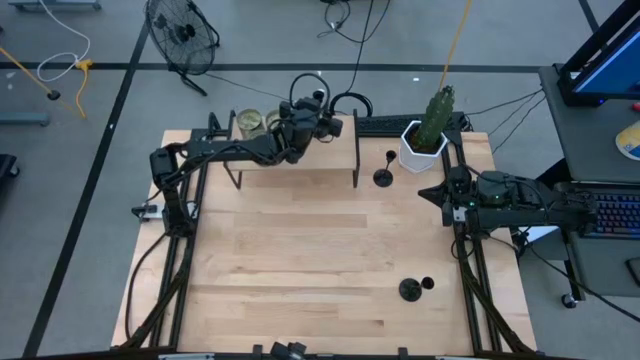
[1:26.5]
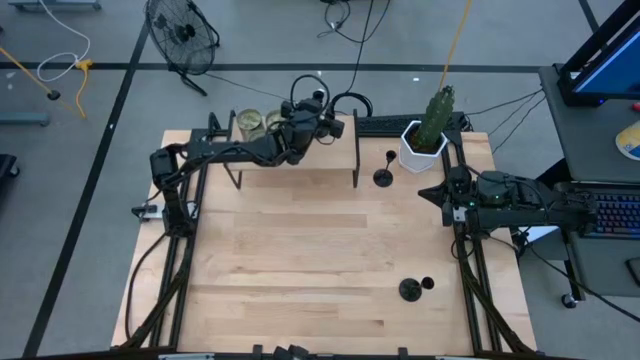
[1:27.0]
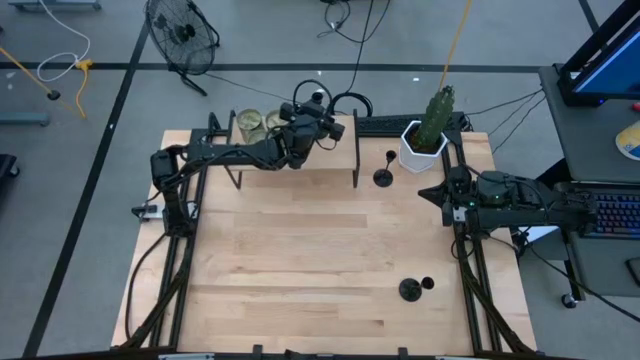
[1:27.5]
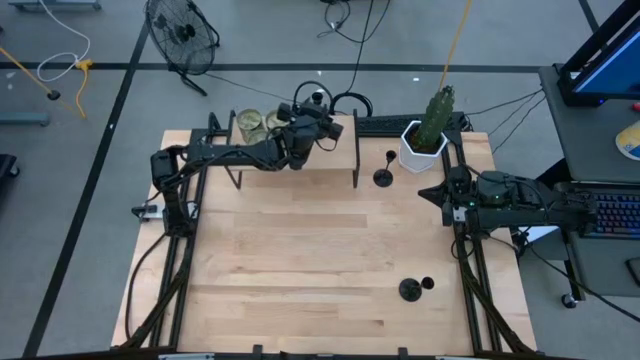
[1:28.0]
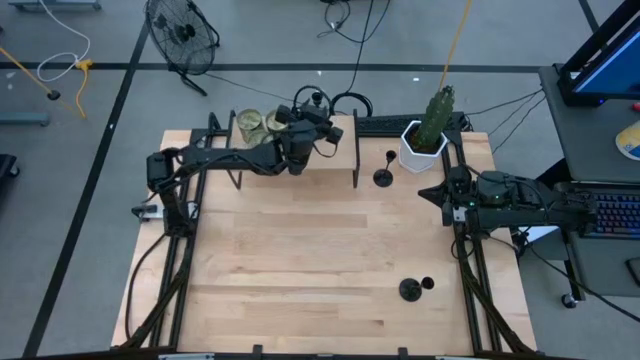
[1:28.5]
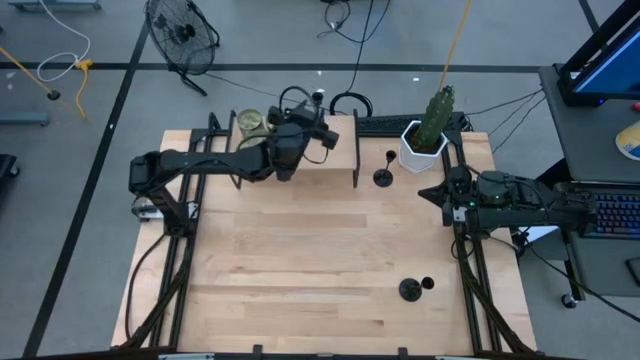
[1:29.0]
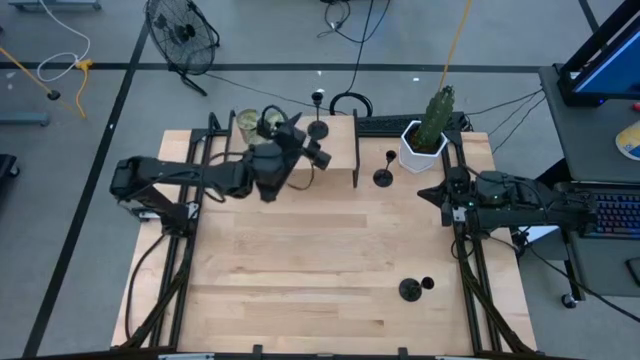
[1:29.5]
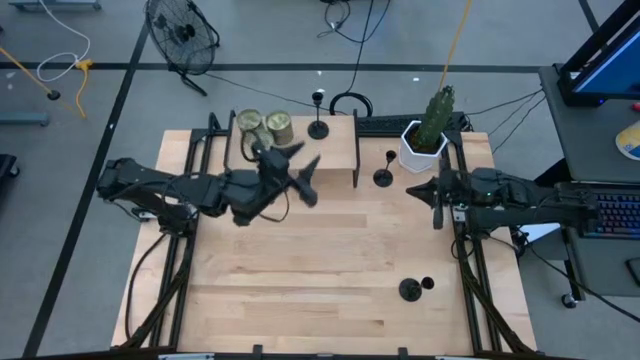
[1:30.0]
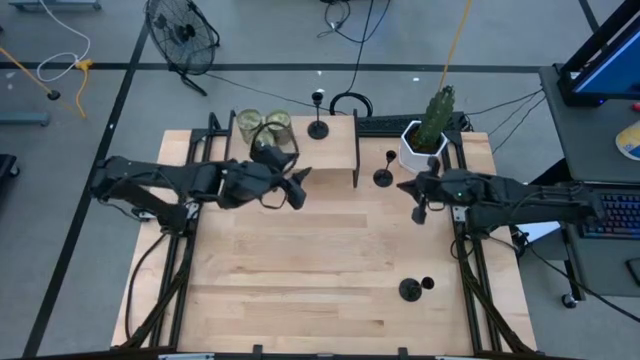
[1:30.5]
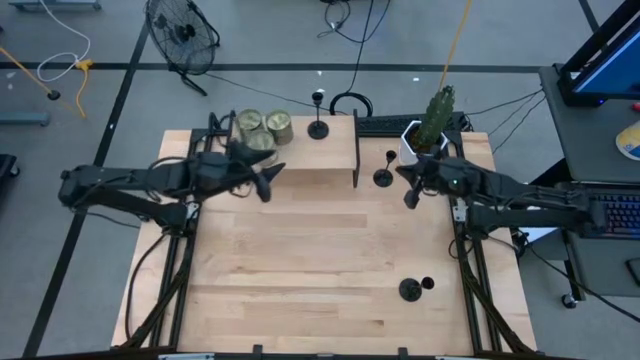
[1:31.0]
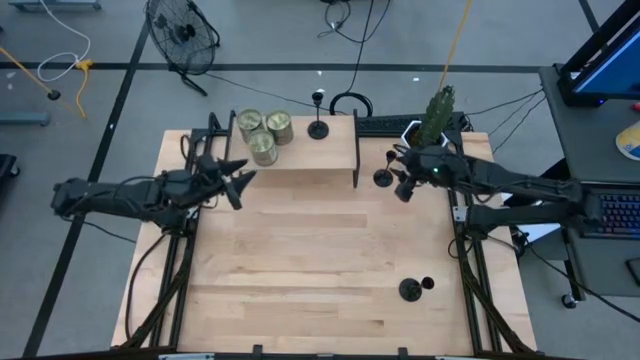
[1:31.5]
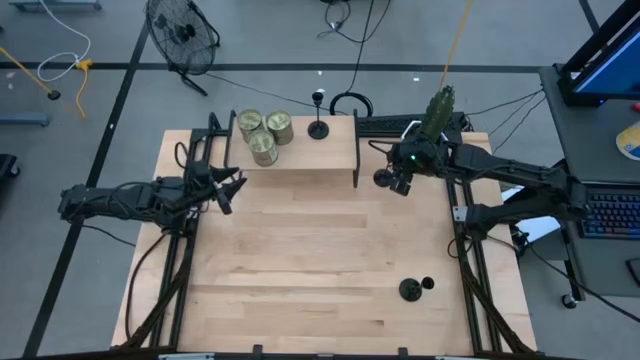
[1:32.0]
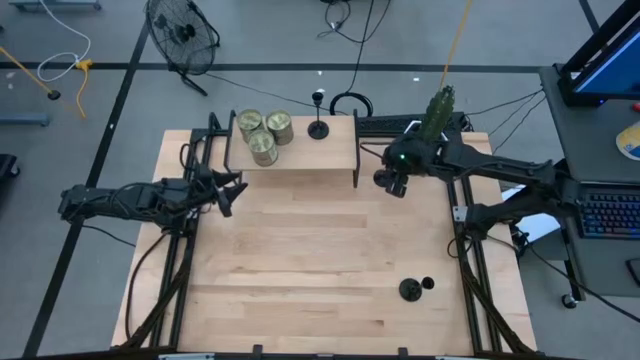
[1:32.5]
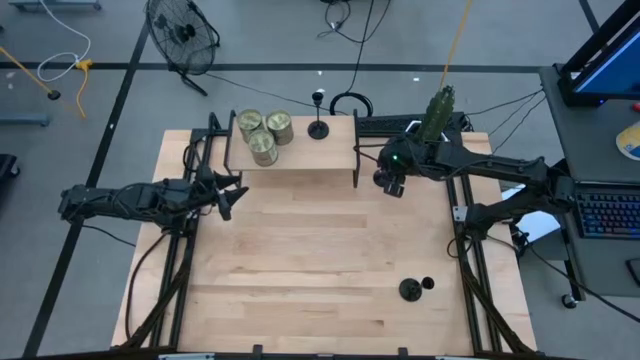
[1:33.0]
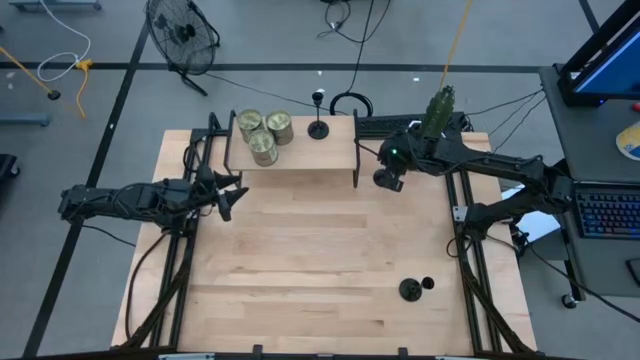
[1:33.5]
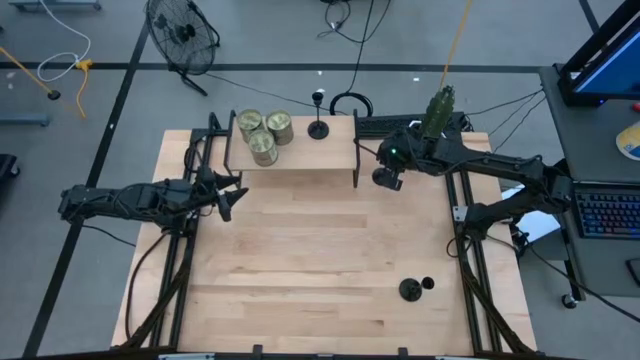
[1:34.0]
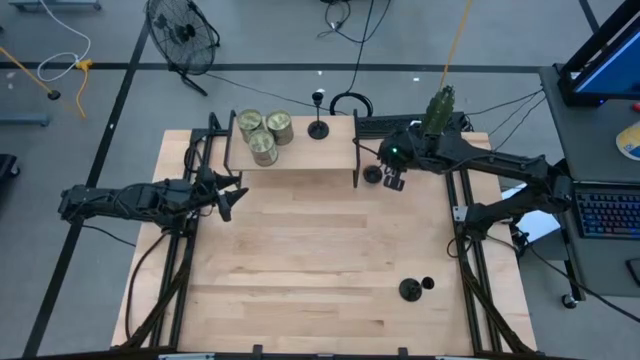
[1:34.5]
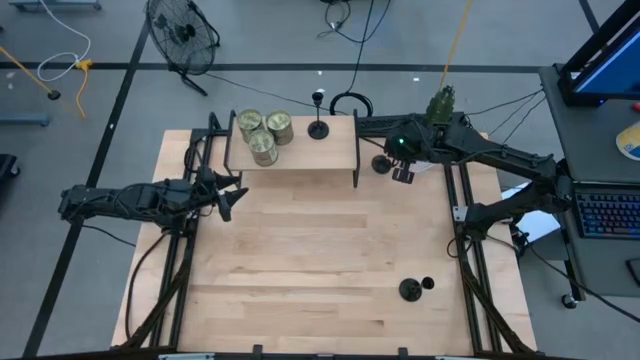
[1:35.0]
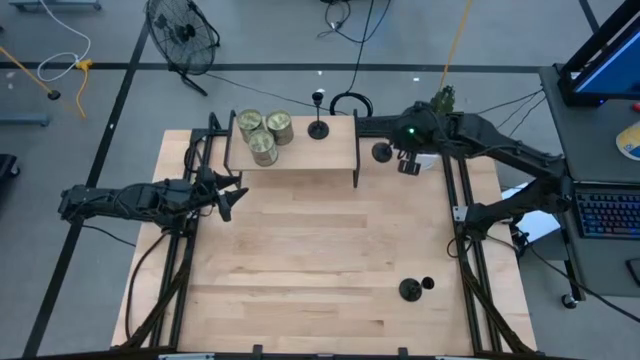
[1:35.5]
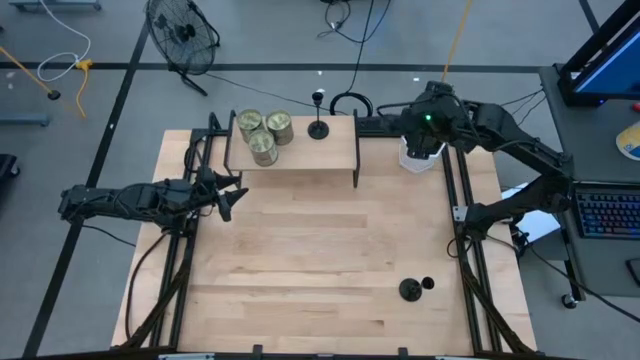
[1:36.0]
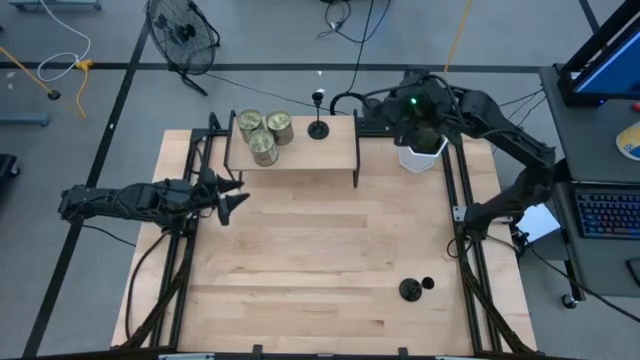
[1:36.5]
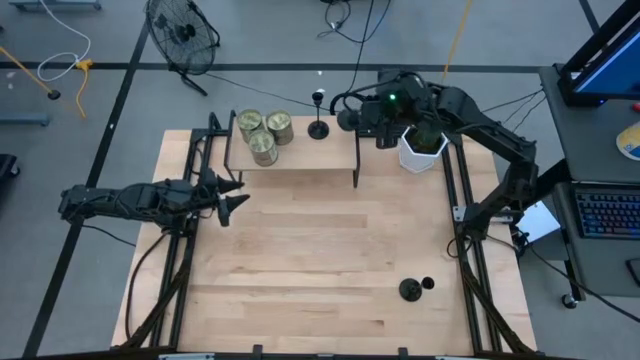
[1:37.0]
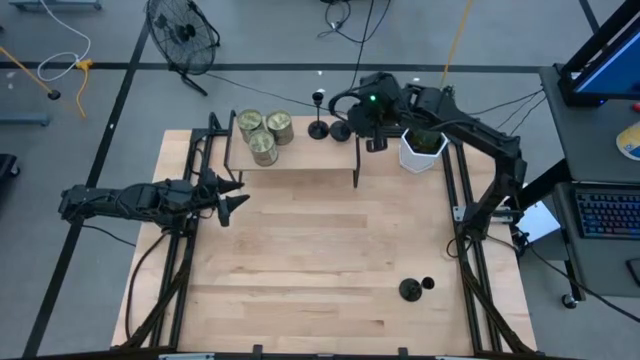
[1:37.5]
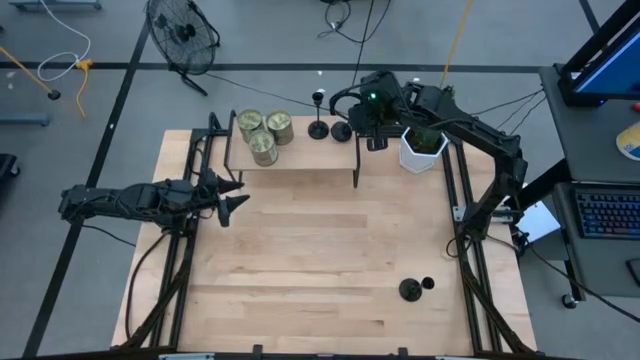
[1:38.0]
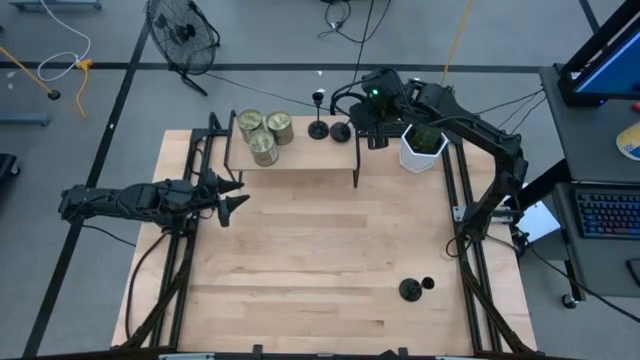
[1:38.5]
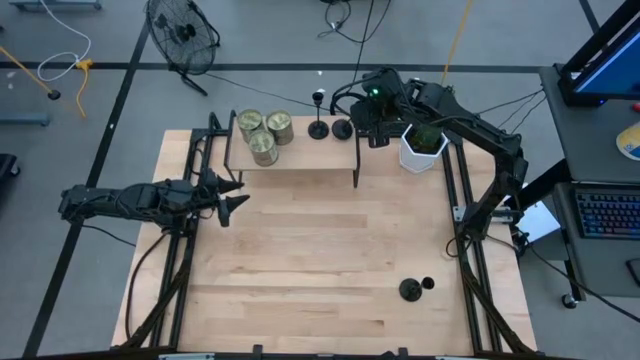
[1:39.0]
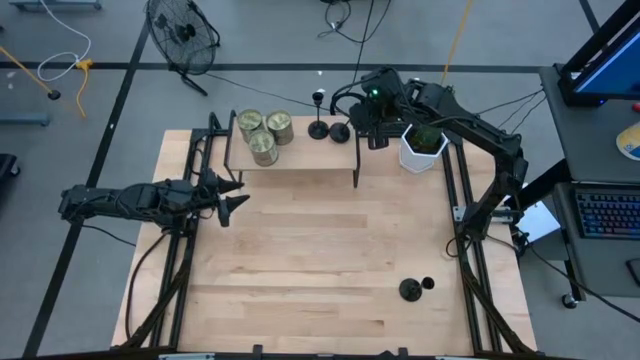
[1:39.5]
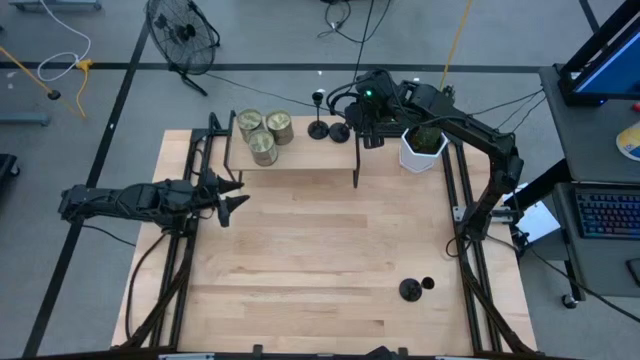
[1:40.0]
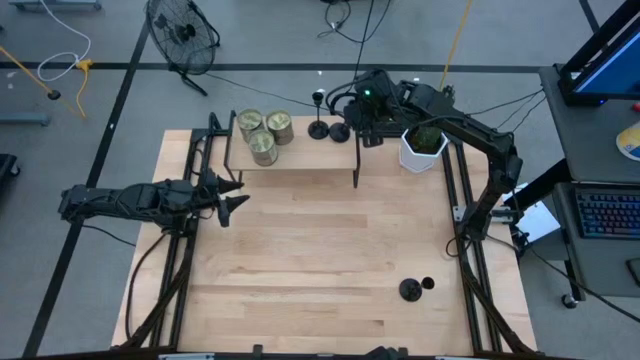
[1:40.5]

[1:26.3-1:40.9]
Task: Pick & Place candle stick holders
Put the top black candle holder on the shelf

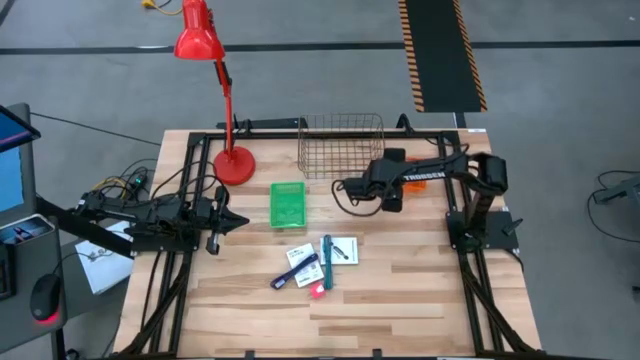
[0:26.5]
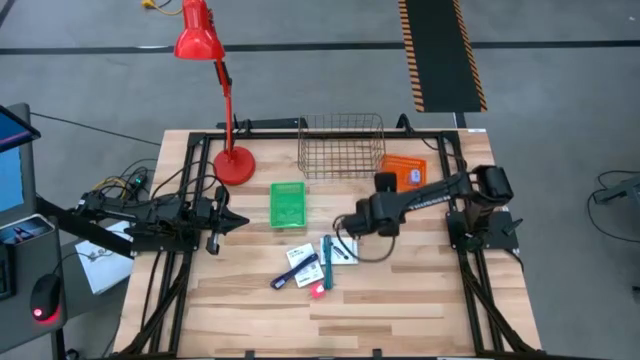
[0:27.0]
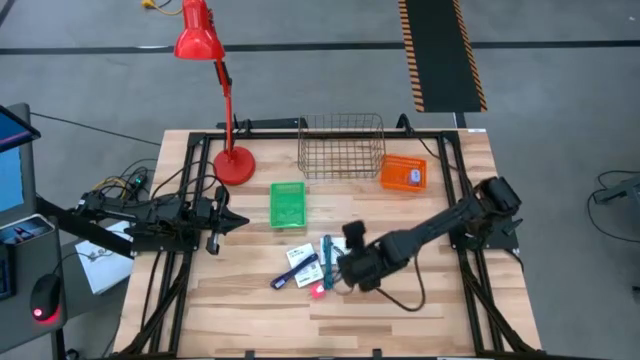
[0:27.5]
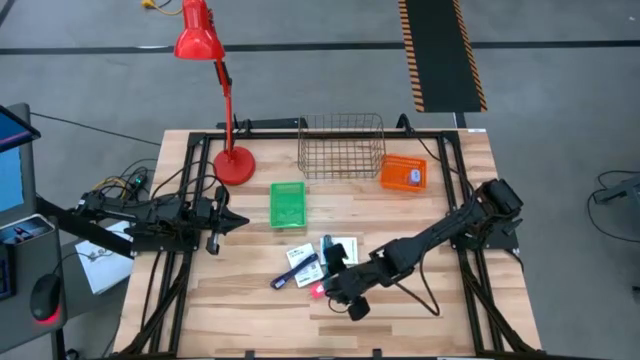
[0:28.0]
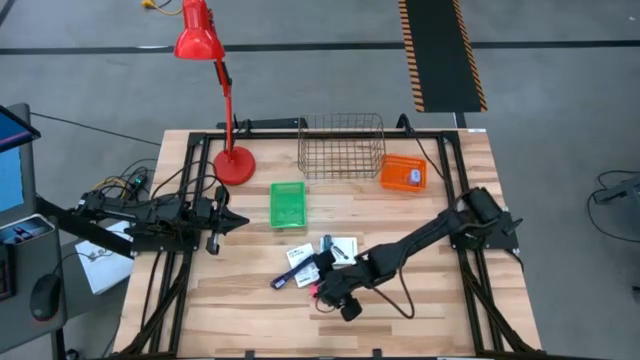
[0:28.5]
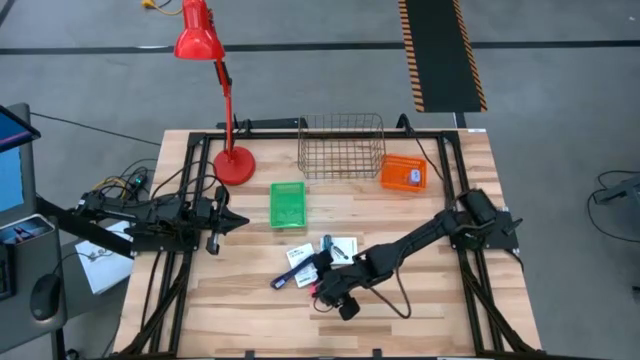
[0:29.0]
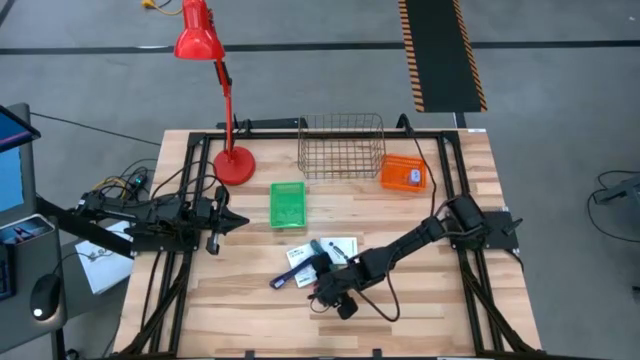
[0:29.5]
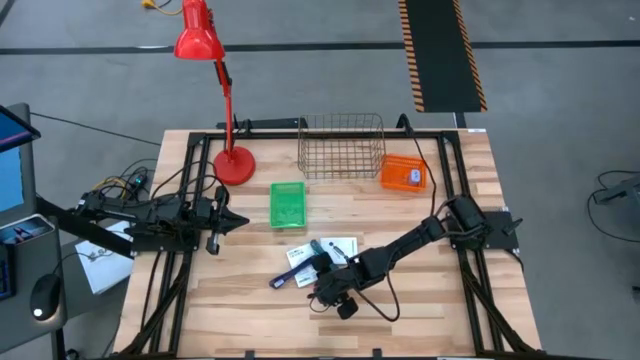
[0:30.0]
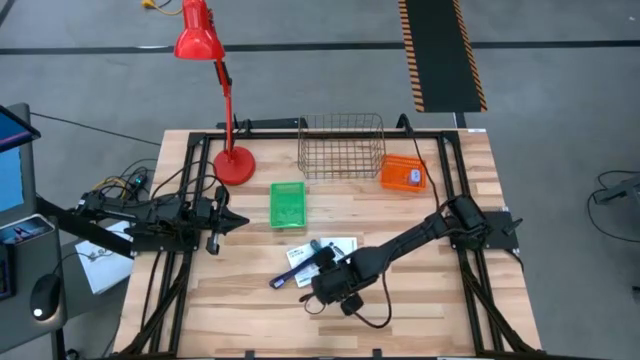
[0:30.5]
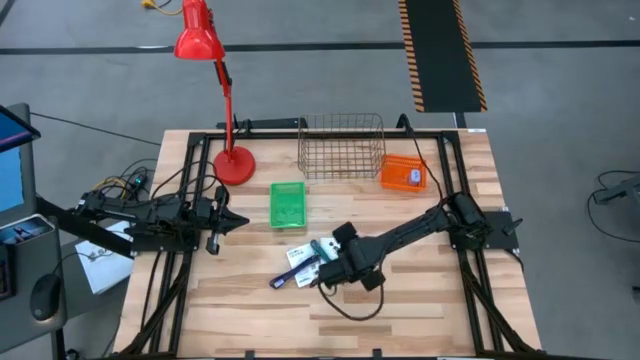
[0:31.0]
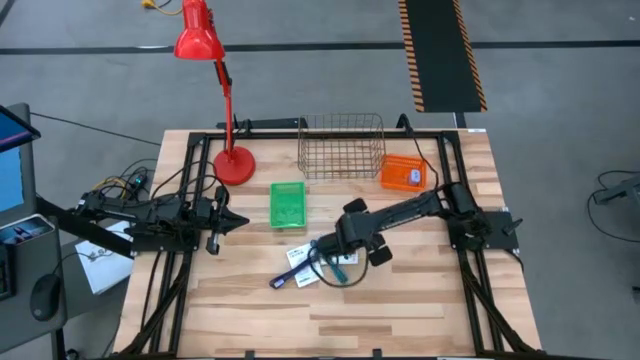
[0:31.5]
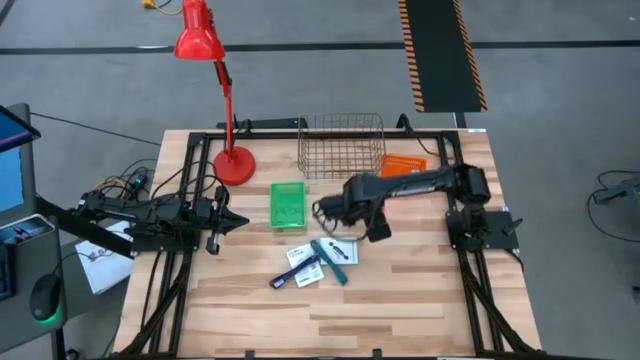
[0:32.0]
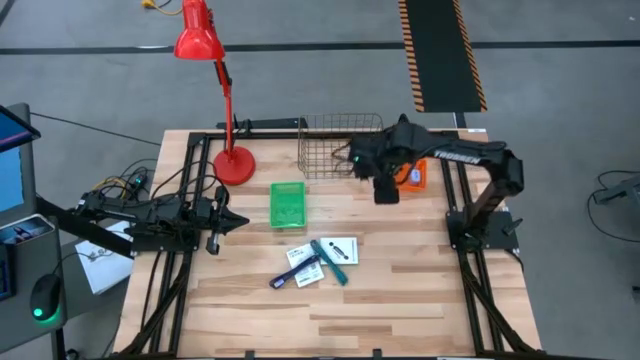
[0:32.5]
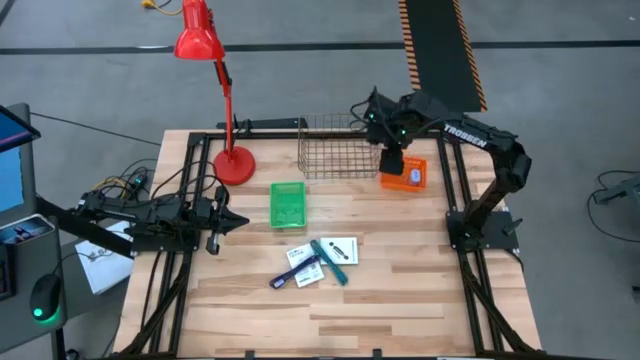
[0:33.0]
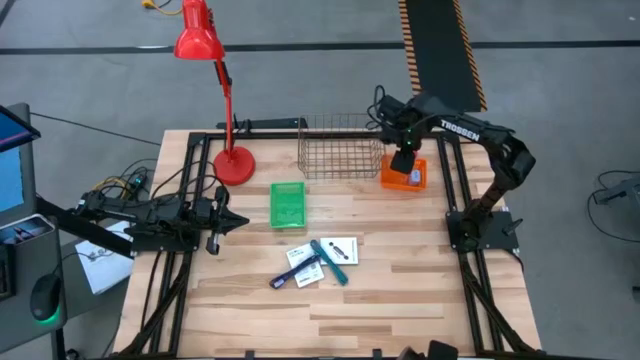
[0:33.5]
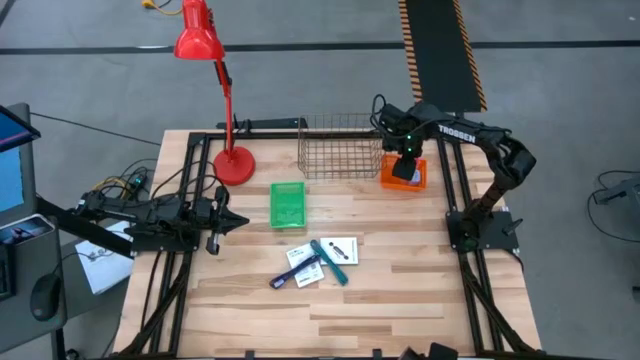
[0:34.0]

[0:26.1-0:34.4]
Task: Pick and place items into bin
Put the pink charger adapter into the orange basket
